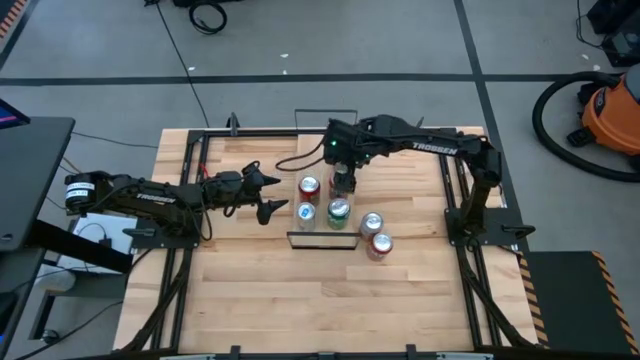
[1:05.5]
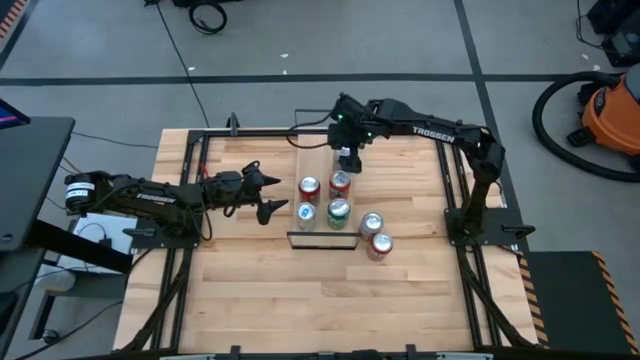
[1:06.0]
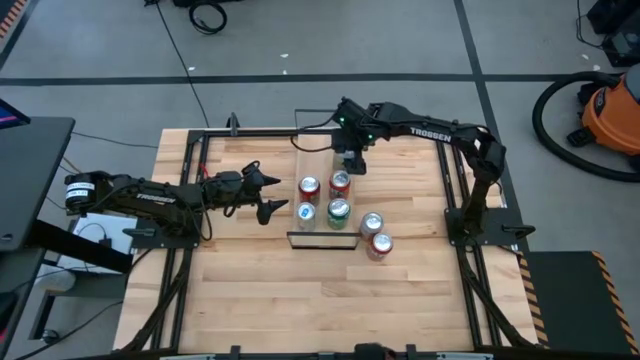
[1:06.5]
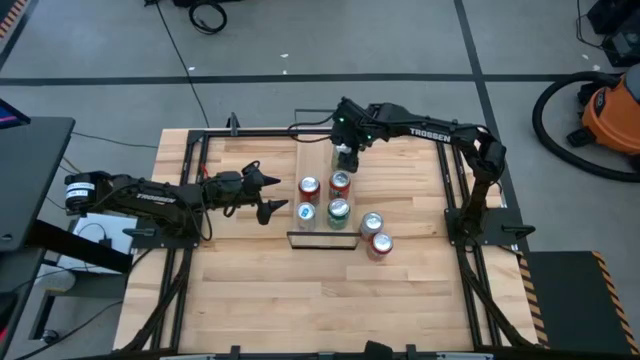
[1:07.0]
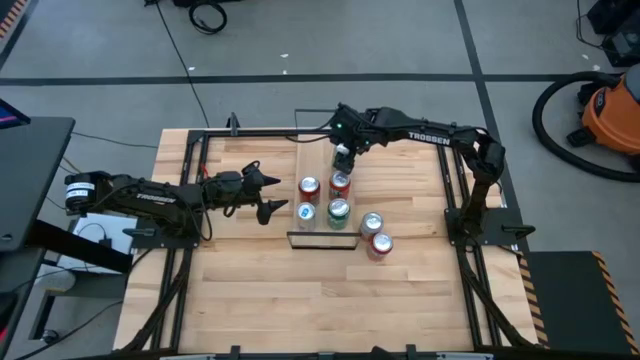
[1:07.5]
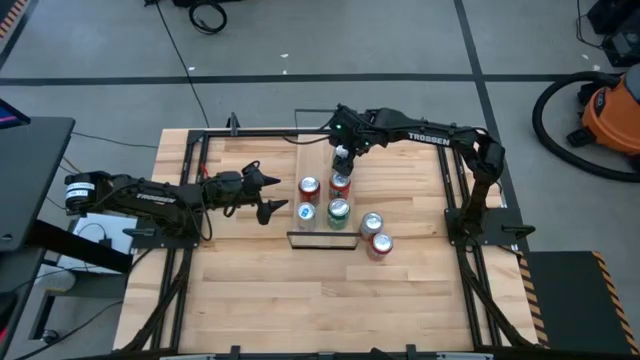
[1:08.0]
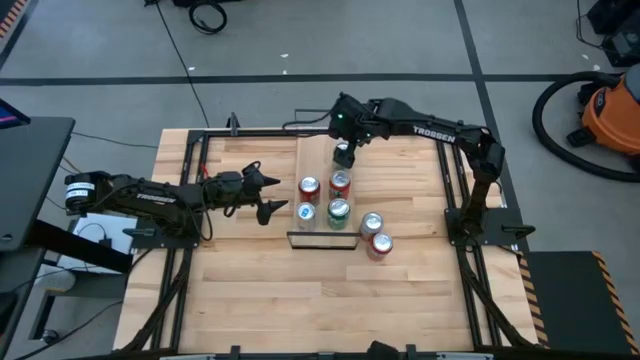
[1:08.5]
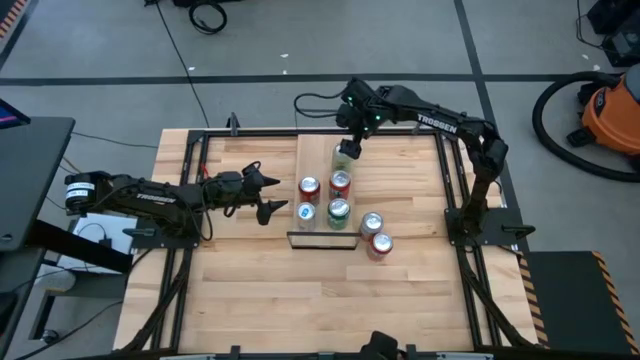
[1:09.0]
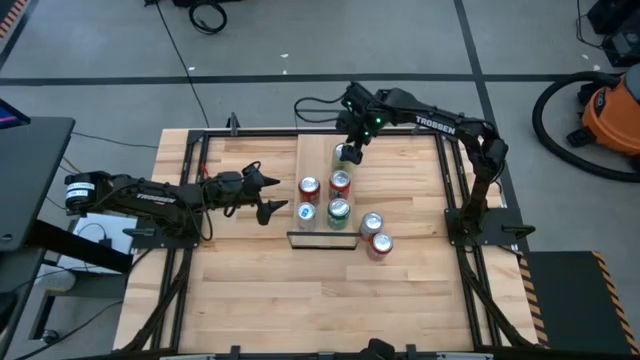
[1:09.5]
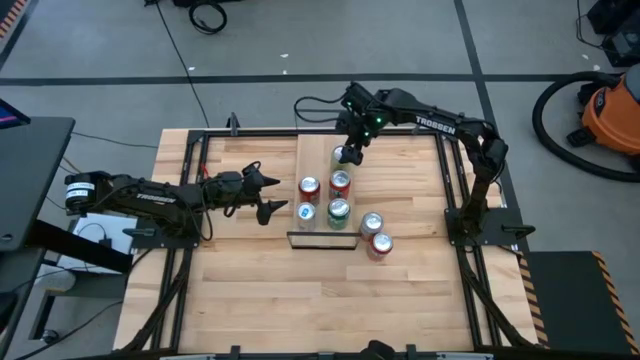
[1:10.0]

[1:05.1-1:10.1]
Task: Place canned beverage on shelf
Adjust the light green soda can on the shelf

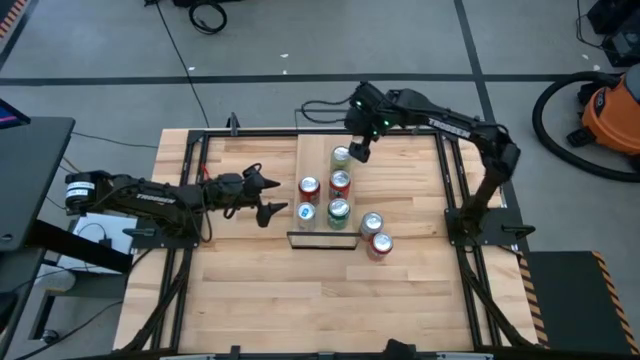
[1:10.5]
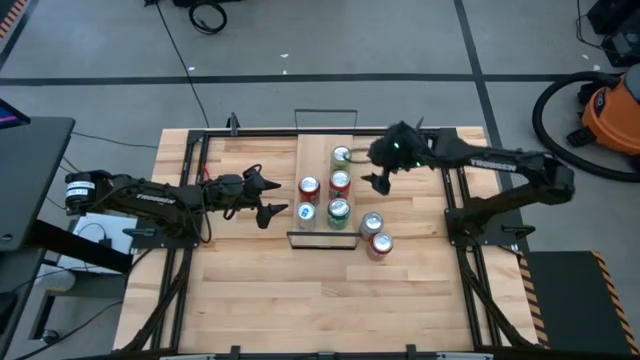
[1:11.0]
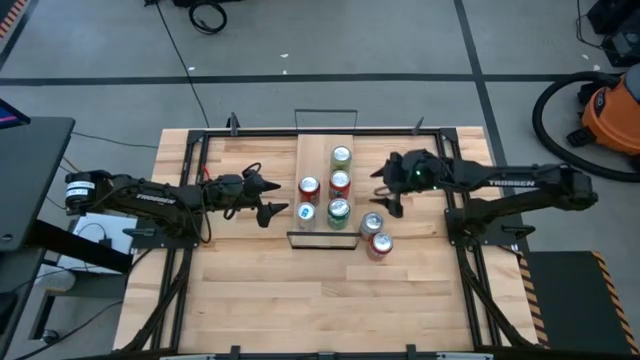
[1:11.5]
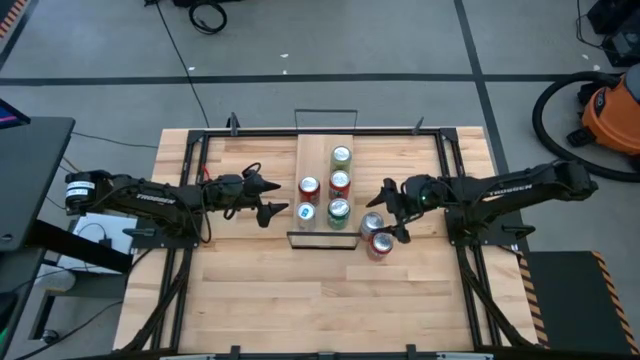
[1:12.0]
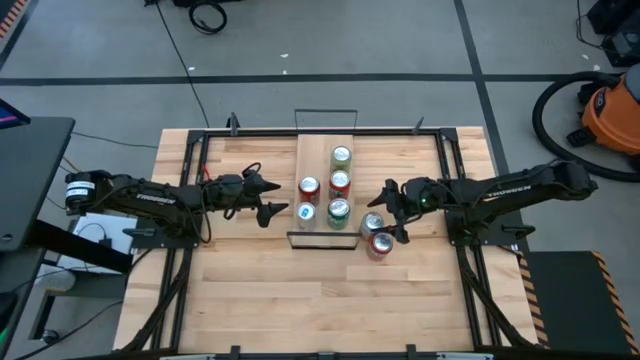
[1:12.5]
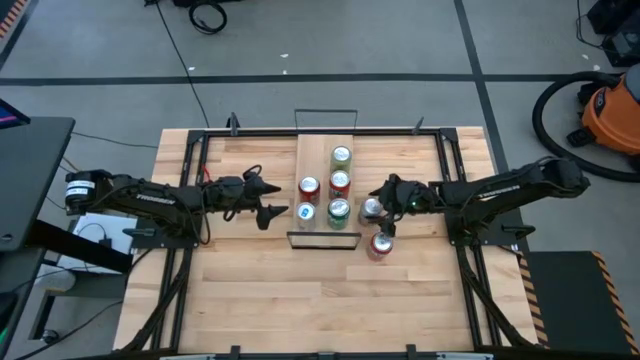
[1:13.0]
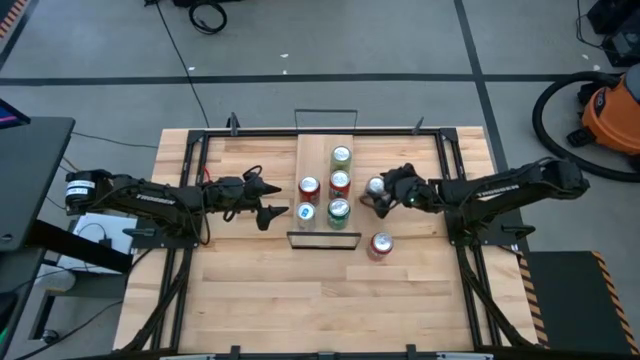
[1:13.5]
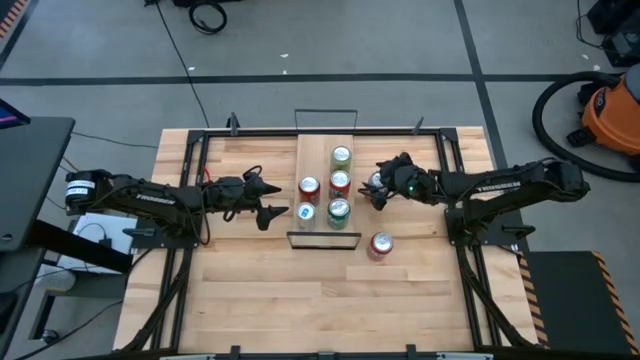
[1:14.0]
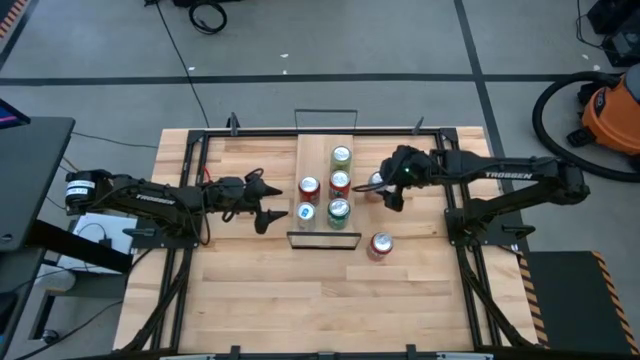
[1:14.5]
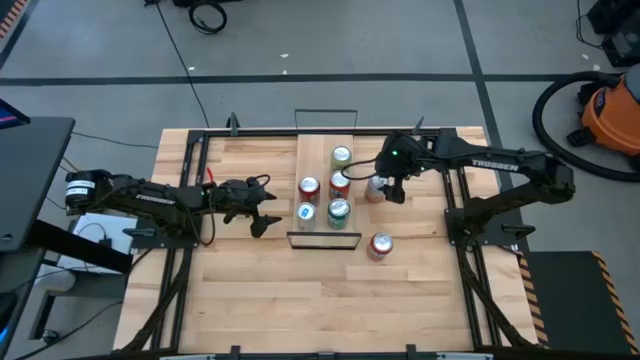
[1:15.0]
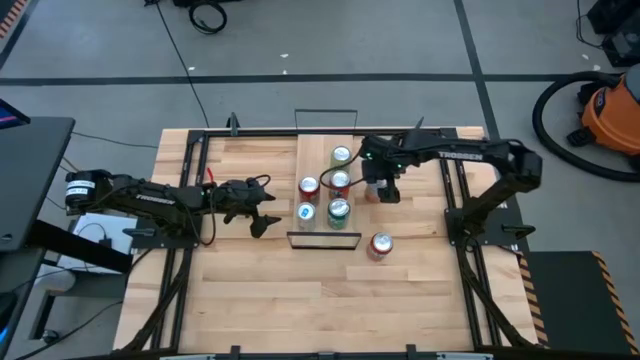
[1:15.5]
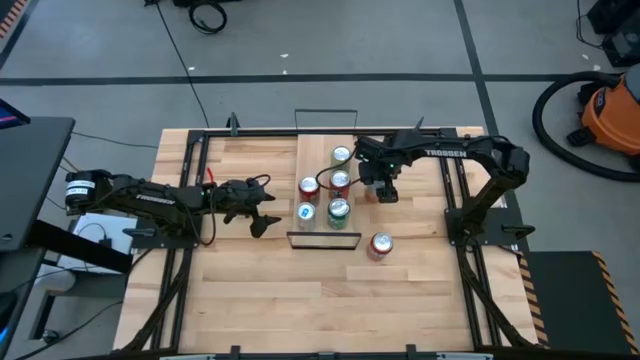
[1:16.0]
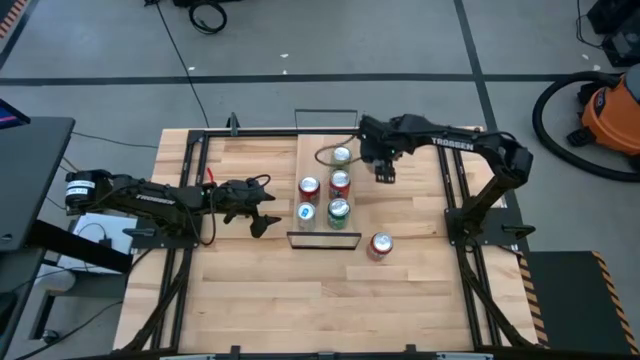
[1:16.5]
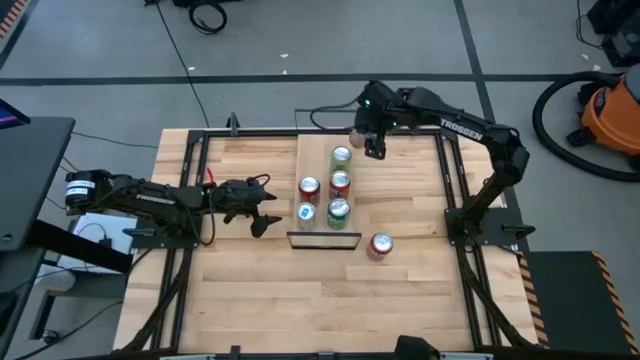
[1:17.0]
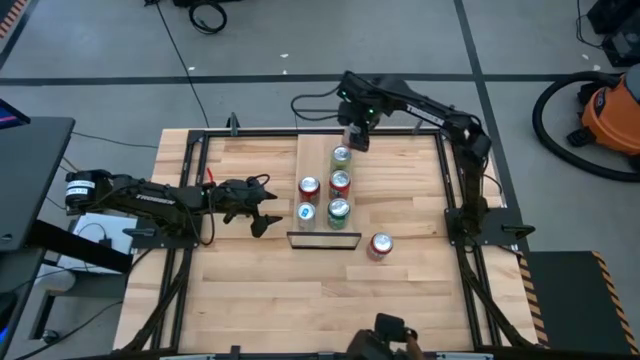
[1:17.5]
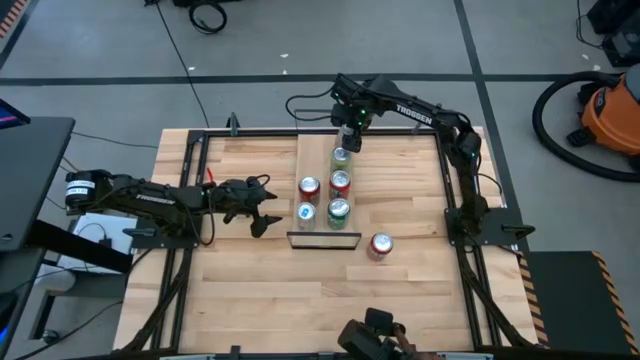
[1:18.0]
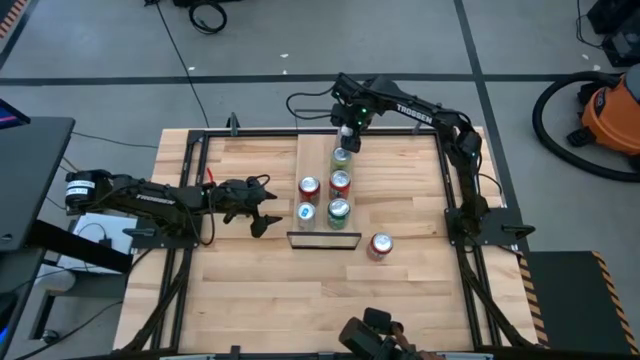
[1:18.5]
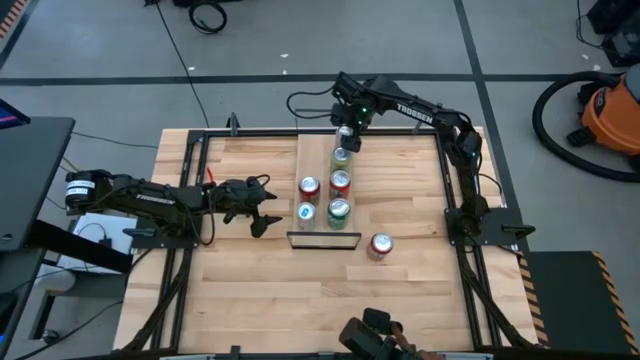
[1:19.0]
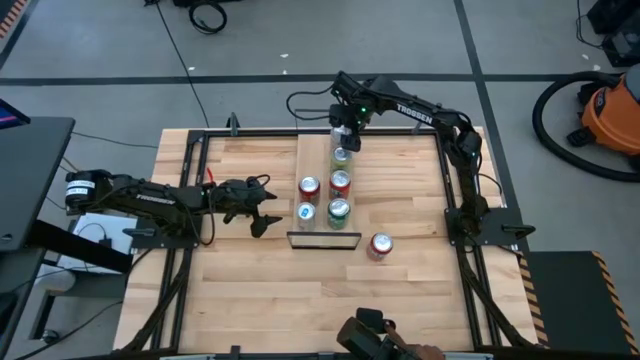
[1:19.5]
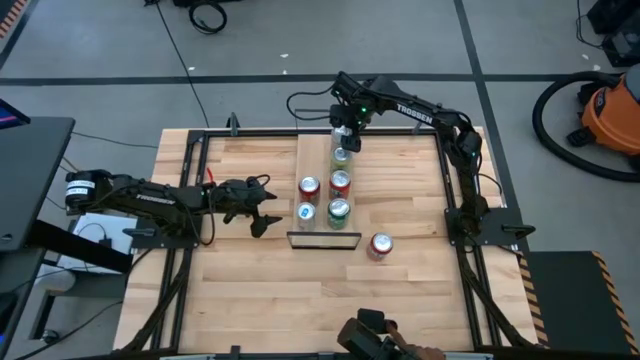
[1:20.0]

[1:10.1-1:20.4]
Put the orange soda can on the shelf

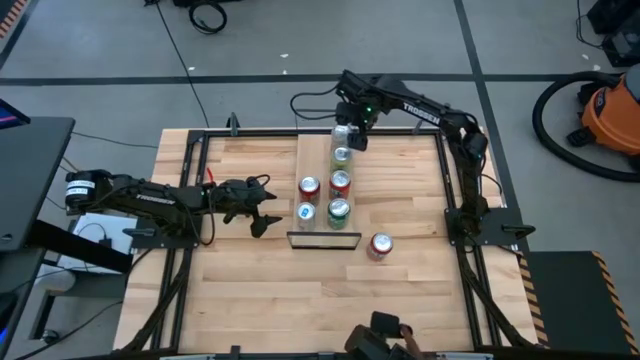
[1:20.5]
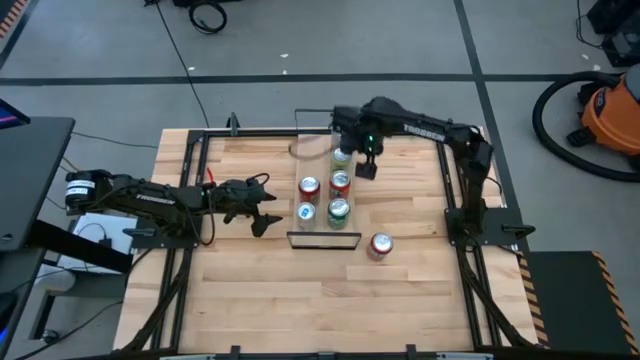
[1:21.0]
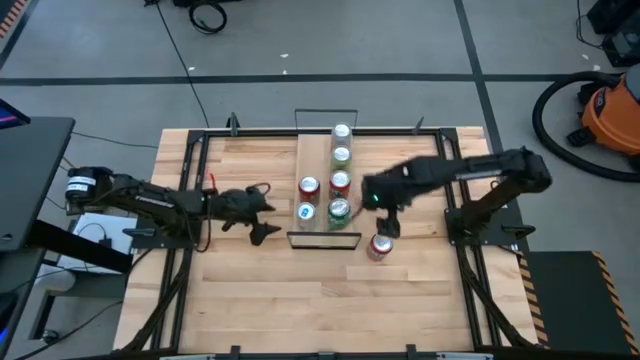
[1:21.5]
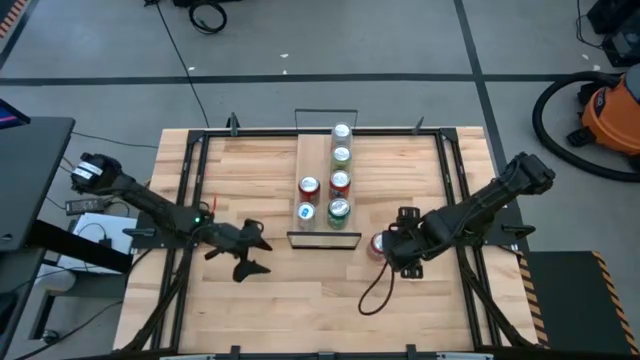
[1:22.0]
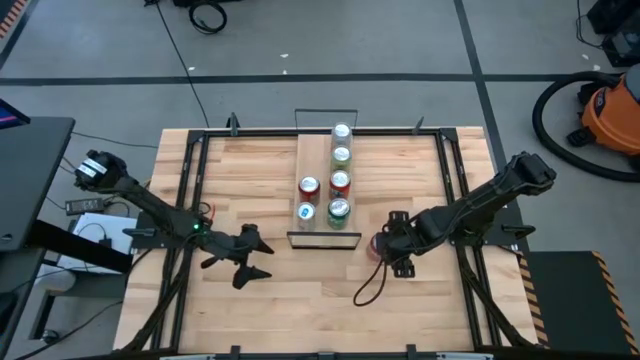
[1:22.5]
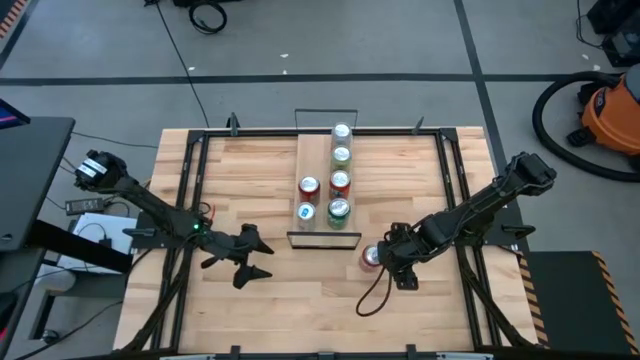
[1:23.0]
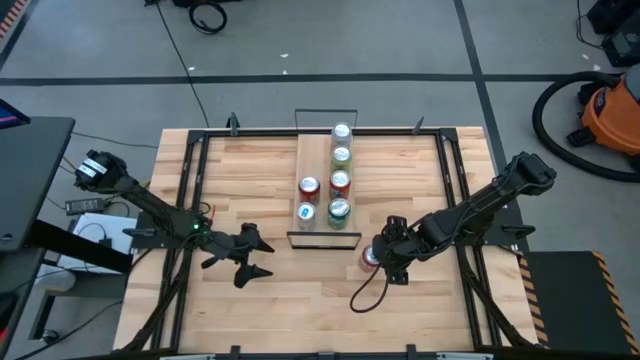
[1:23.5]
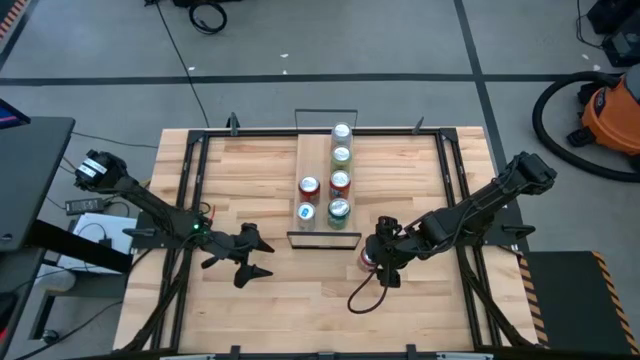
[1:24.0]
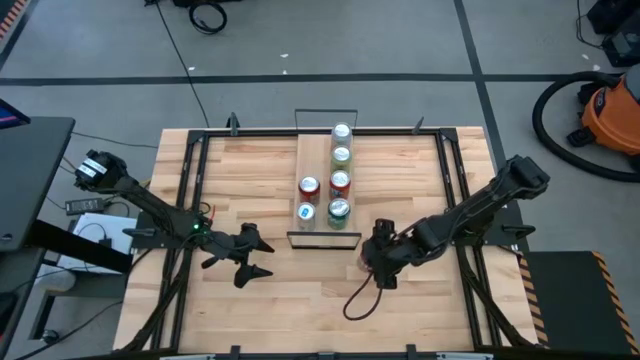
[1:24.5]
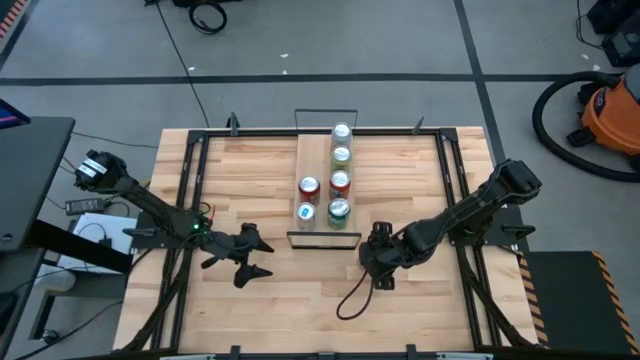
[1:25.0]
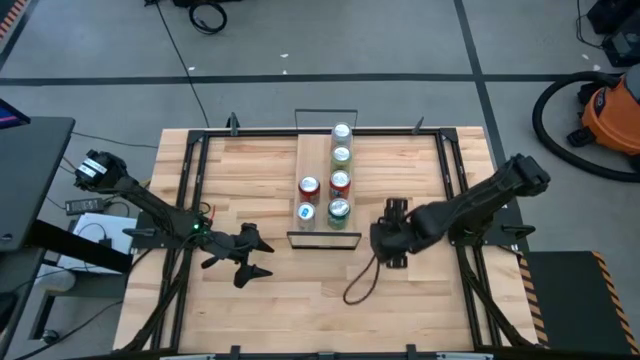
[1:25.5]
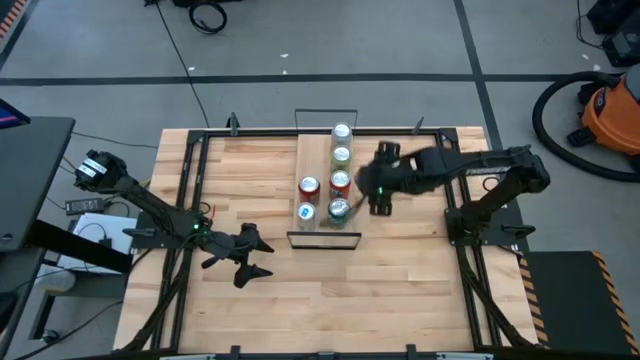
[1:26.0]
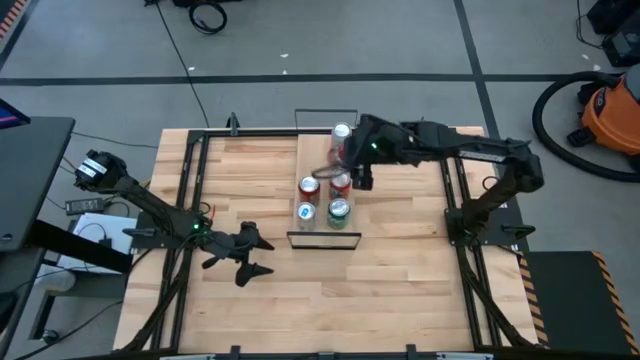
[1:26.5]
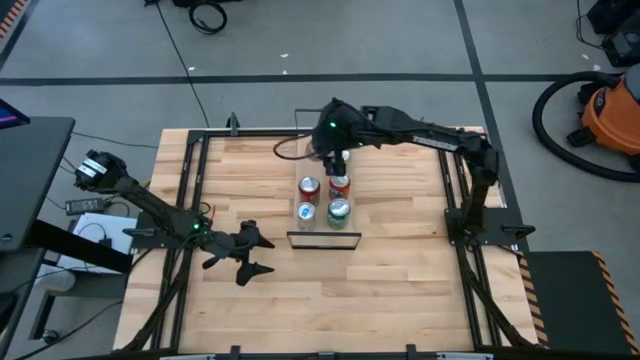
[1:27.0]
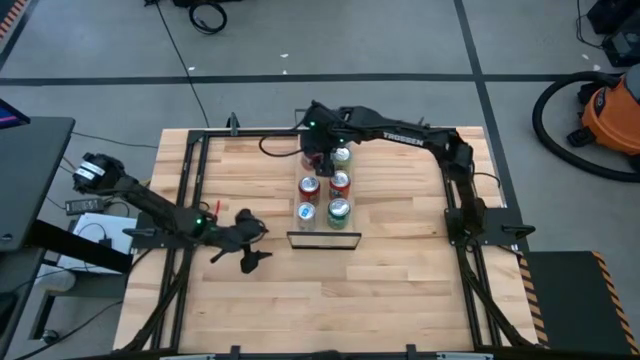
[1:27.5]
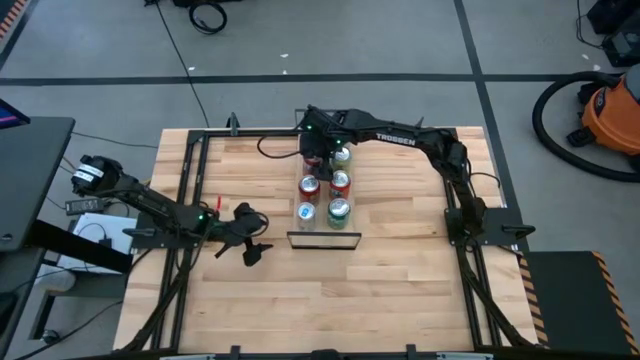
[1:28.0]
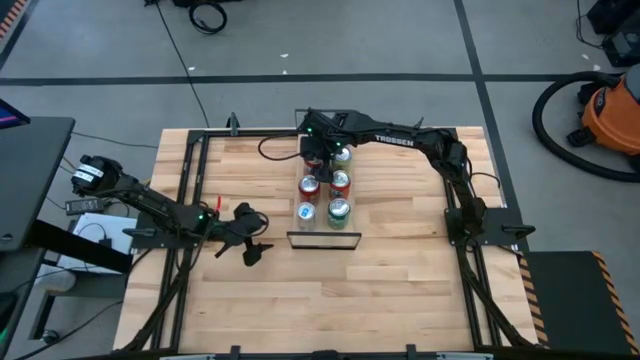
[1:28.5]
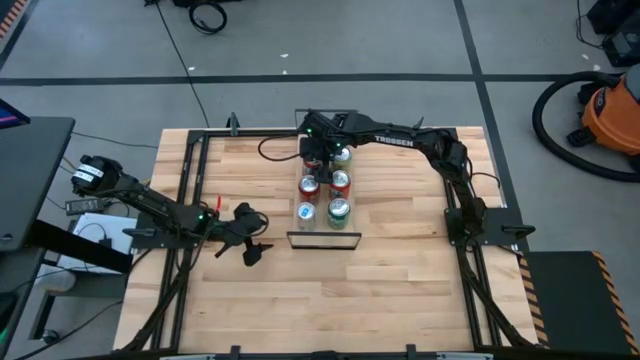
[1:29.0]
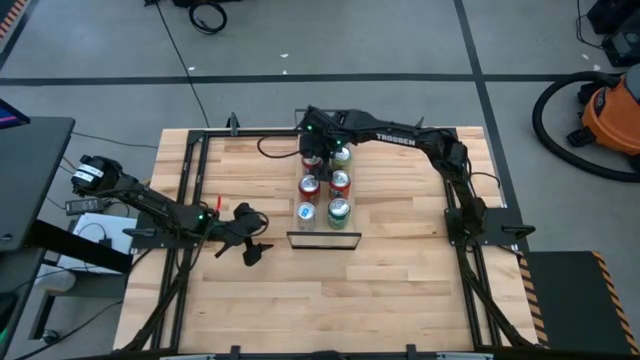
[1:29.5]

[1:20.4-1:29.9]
Put the red soda can on the shelf
